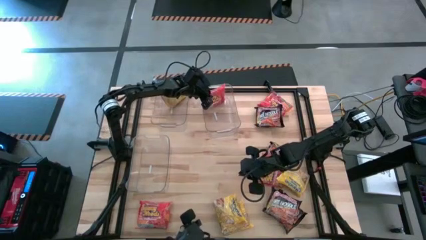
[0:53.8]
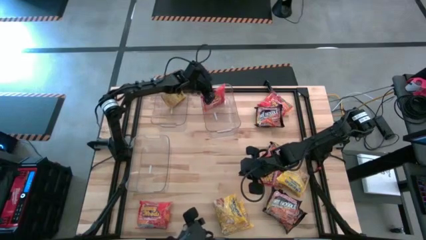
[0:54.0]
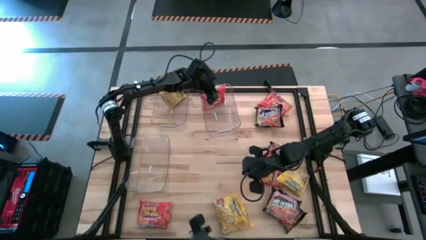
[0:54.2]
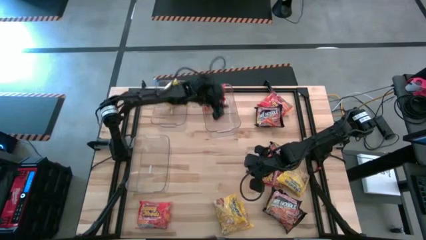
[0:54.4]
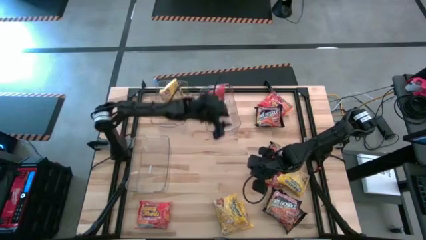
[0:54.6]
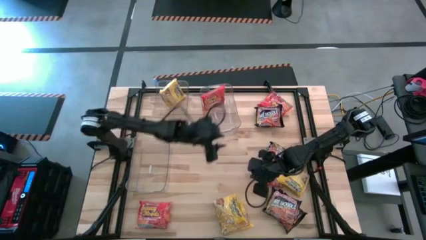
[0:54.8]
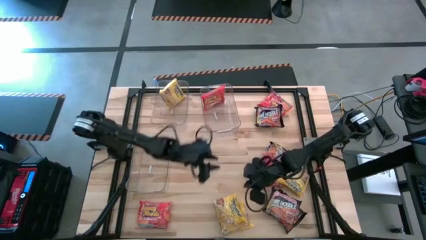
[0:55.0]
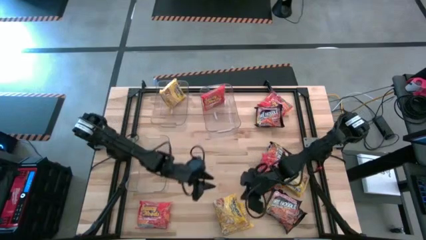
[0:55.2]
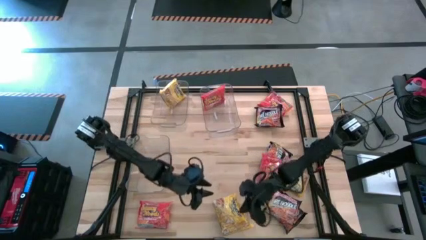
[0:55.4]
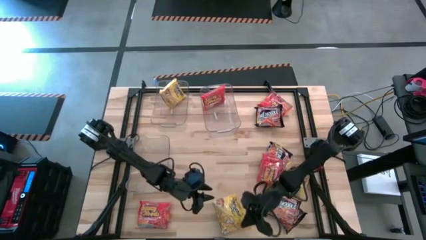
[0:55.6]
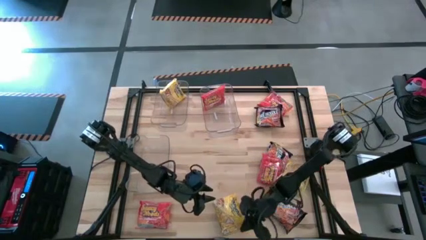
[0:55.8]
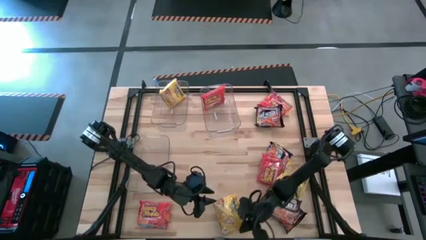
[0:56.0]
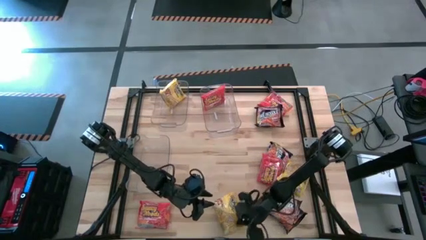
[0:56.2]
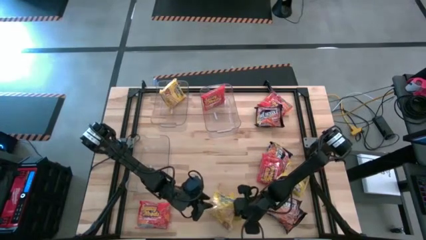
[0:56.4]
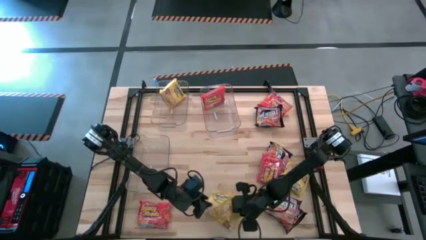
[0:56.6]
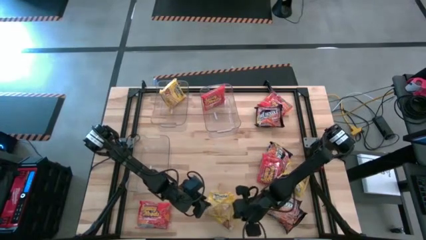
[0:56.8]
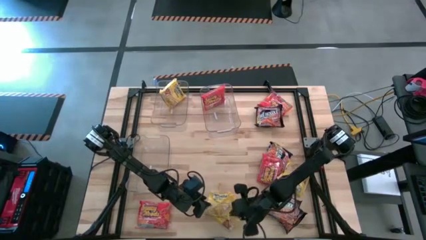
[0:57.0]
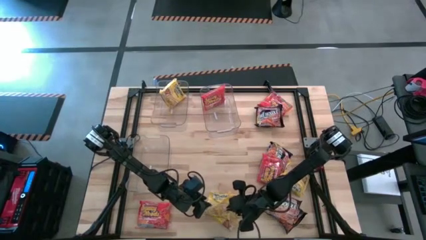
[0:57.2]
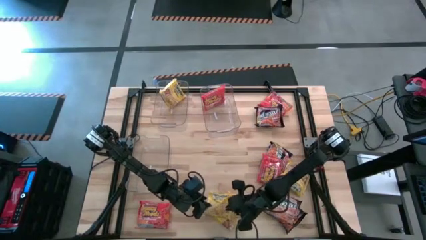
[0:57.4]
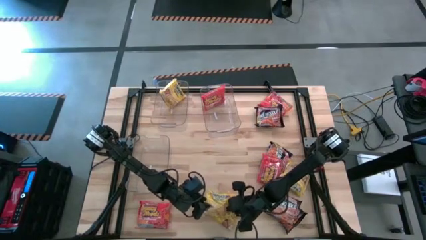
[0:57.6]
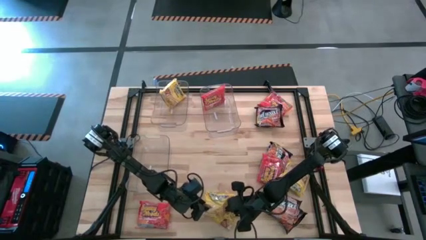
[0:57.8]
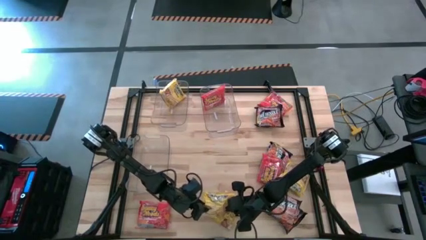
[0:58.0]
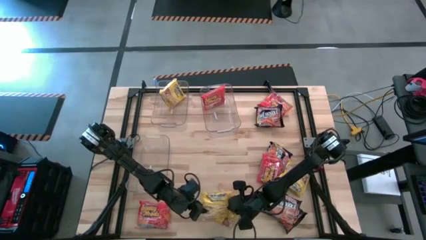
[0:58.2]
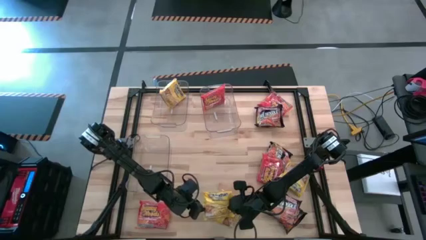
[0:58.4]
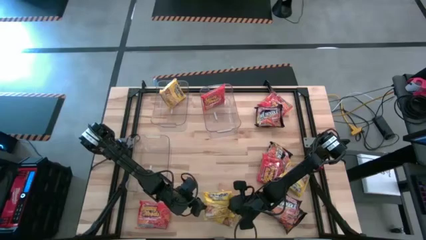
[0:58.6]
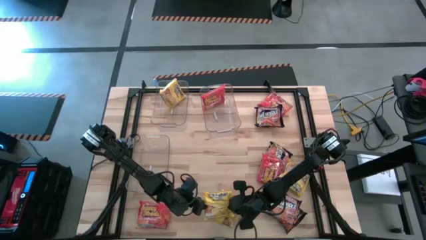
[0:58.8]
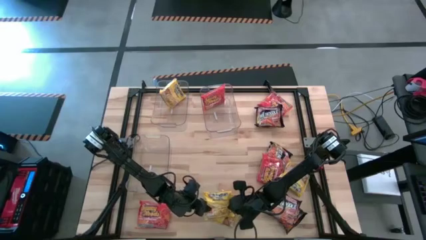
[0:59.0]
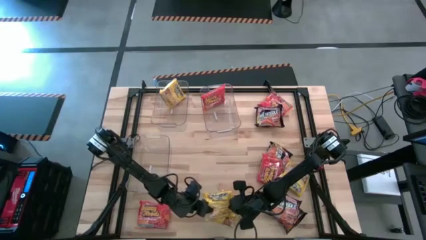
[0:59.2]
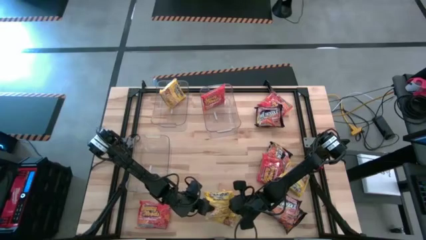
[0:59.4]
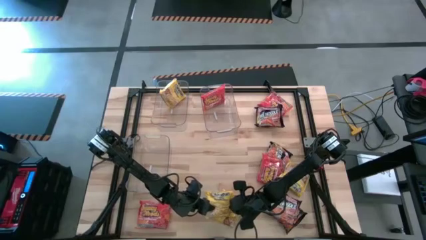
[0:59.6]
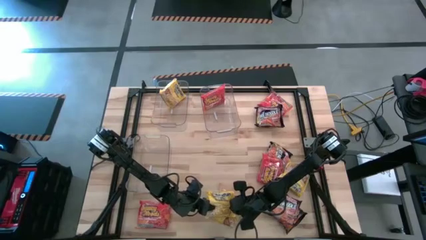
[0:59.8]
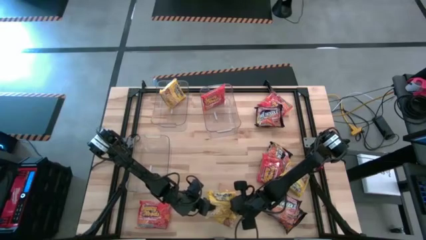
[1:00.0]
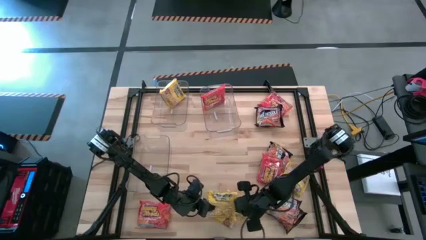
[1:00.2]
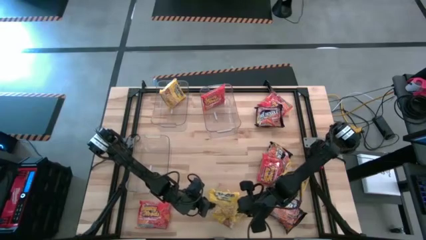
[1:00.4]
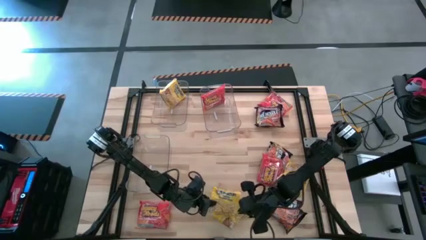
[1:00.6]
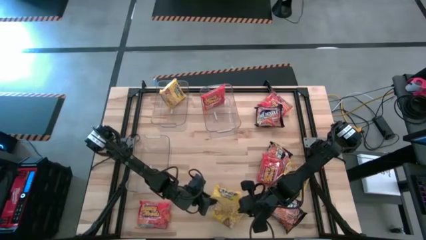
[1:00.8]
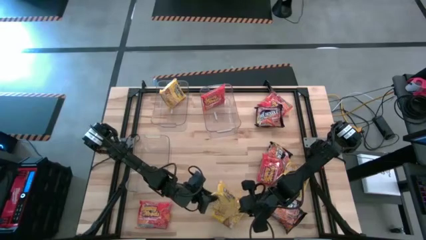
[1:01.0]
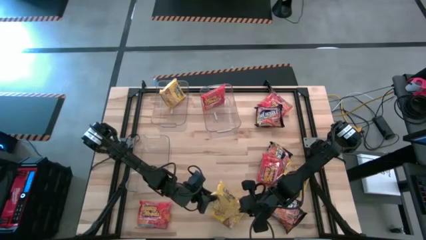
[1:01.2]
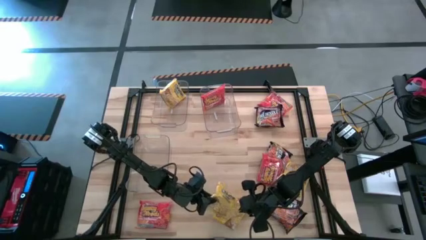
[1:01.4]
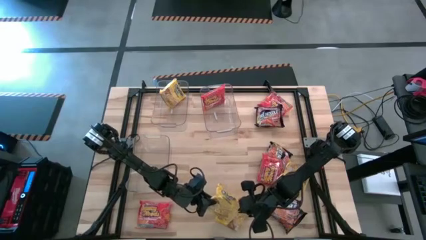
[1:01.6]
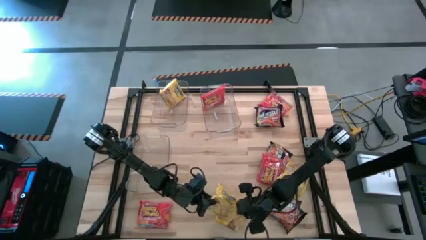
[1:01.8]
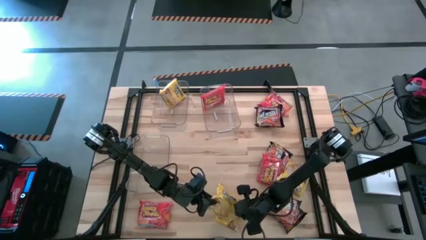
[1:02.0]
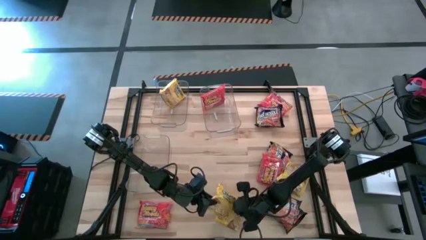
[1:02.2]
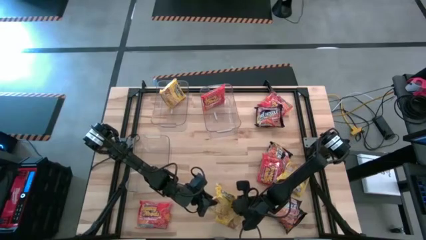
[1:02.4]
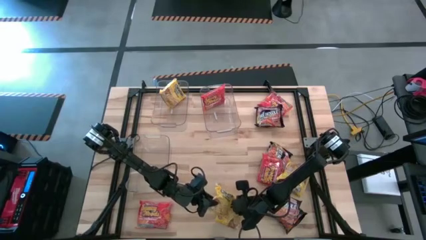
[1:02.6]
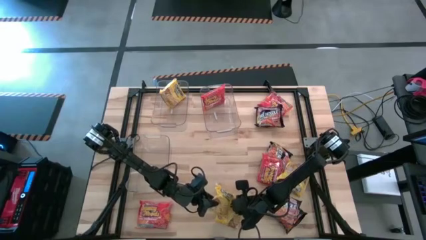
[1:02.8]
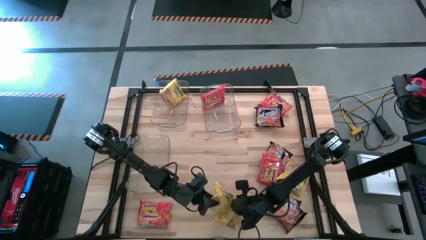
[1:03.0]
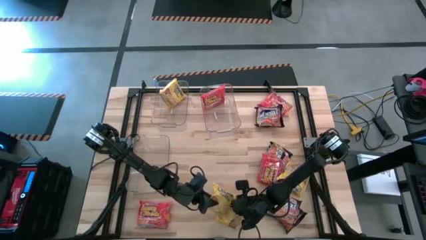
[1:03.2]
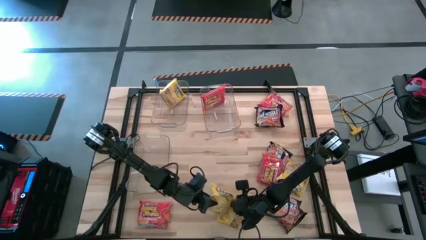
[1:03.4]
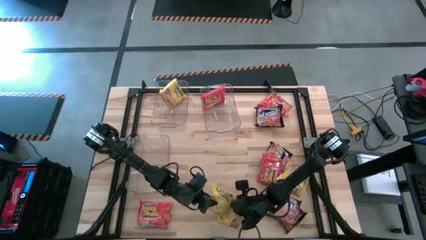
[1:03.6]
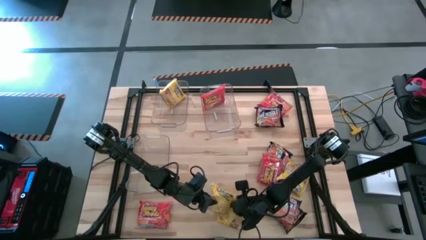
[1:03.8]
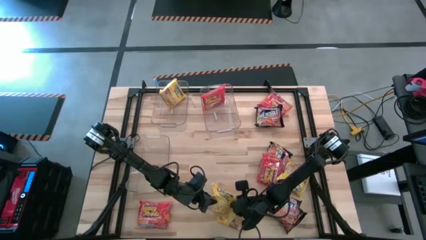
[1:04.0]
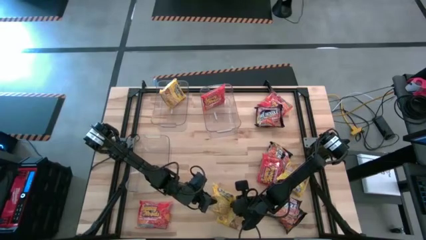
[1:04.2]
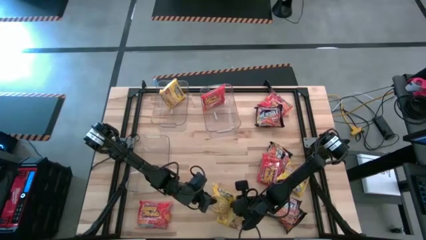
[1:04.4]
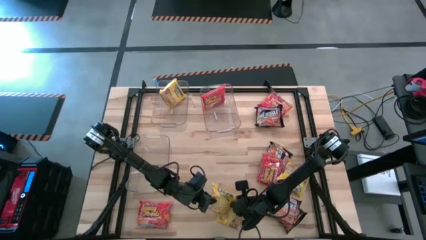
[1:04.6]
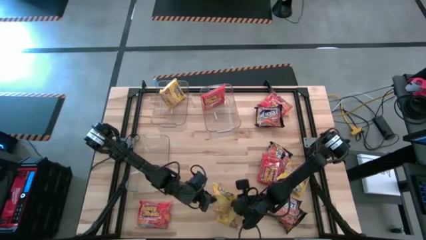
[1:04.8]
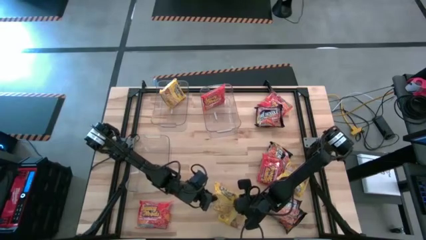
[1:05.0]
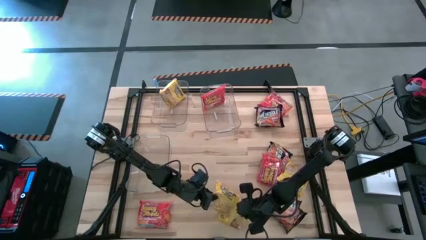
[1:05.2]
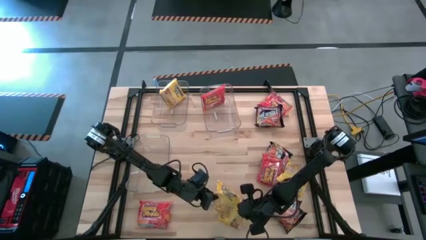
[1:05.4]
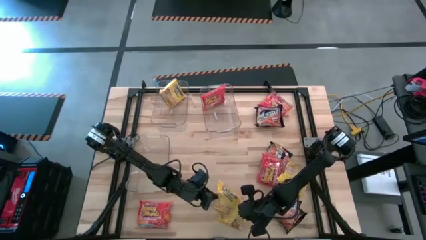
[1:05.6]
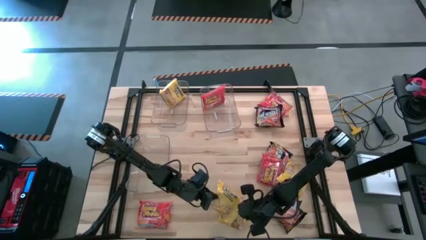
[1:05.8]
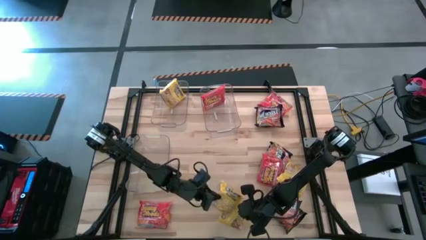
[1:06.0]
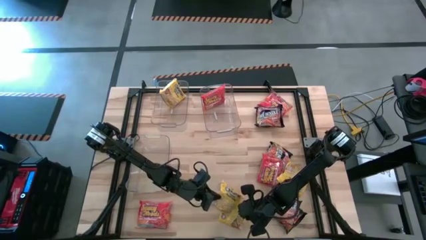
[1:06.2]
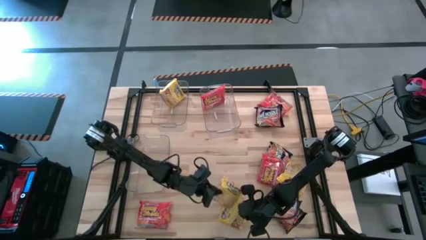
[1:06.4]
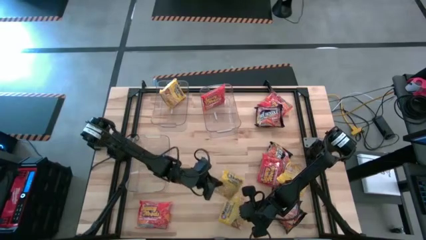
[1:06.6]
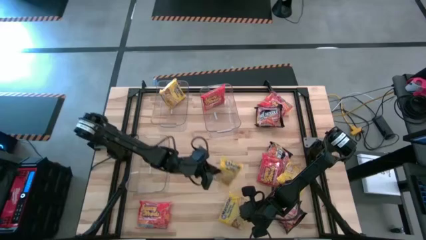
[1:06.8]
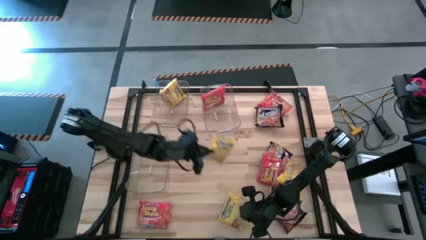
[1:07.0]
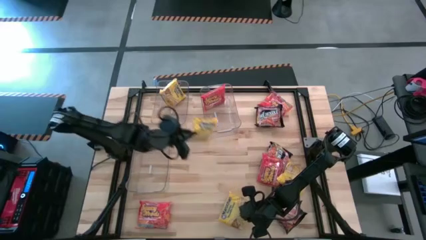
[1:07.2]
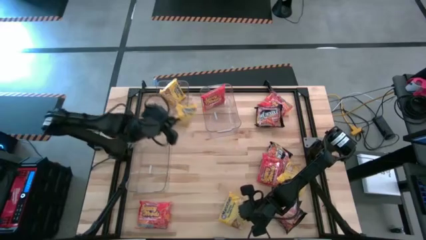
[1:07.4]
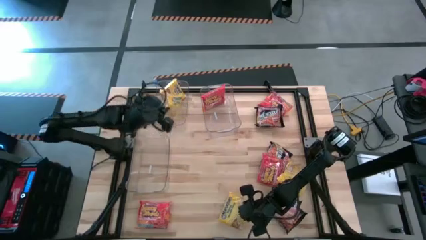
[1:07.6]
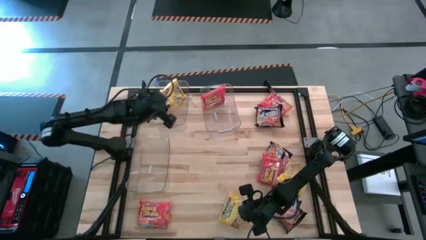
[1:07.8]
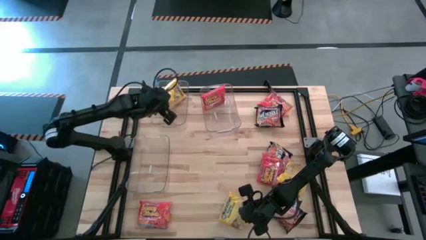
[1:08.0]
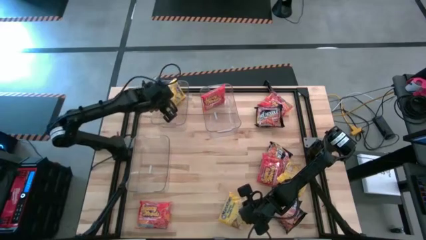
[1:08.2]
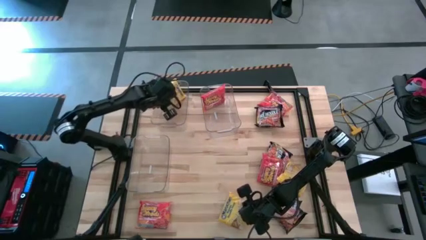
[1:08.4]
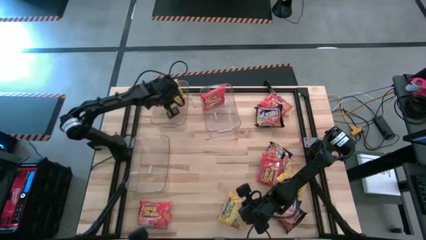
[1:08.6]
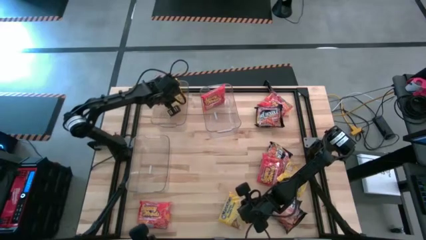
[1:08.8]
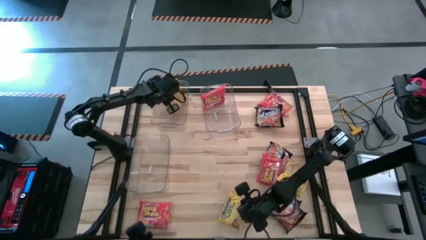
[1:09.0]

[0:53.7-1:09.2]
Task: Sort Maruchan noodles
Put the yellow noodle pack into the top left transparent bin
